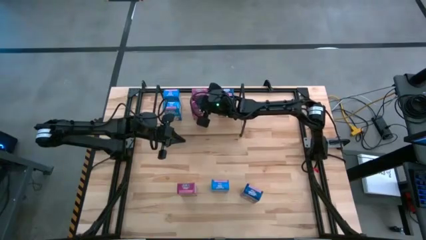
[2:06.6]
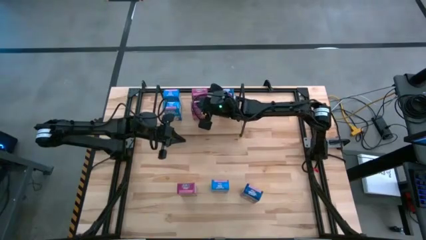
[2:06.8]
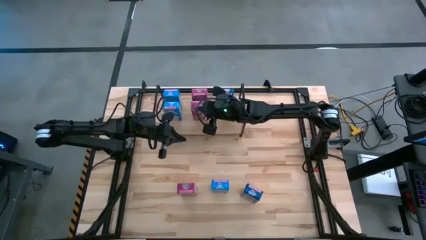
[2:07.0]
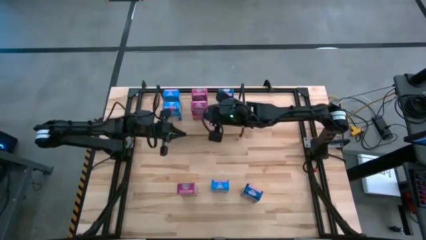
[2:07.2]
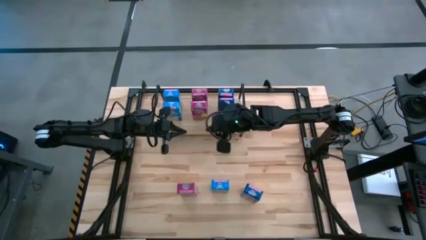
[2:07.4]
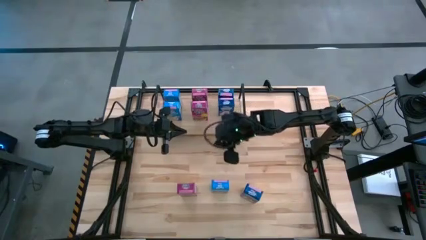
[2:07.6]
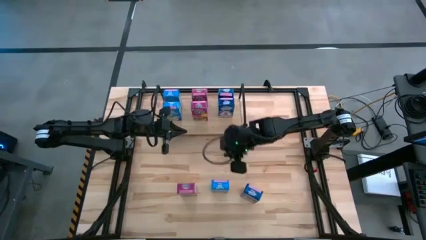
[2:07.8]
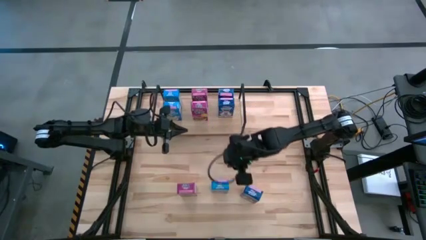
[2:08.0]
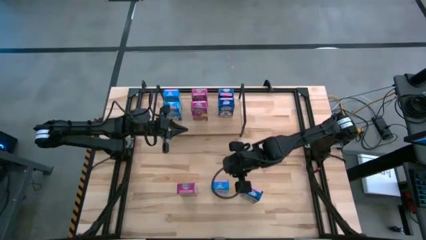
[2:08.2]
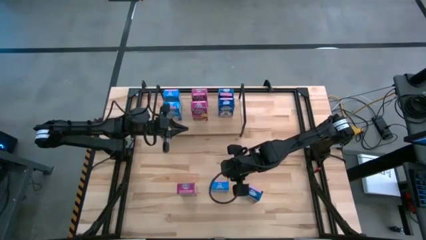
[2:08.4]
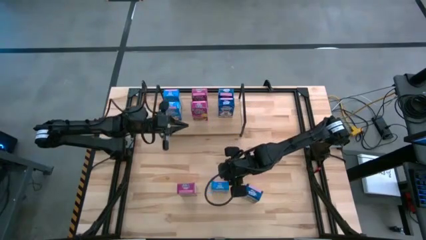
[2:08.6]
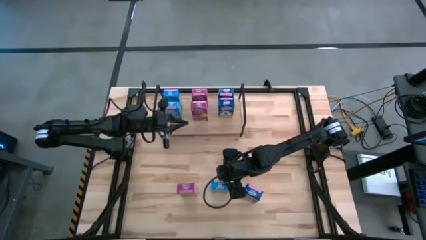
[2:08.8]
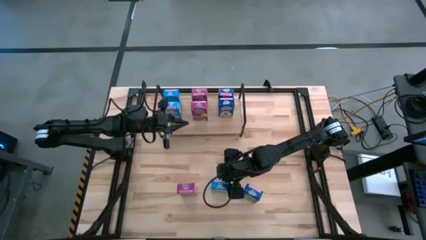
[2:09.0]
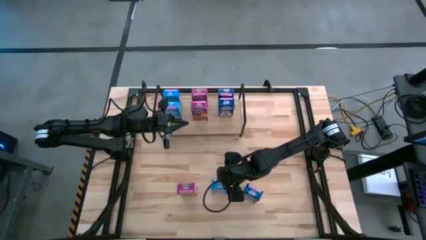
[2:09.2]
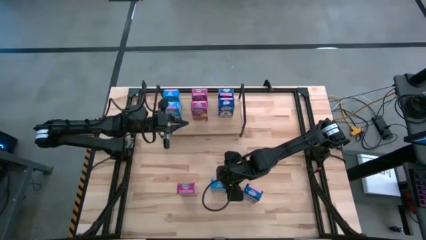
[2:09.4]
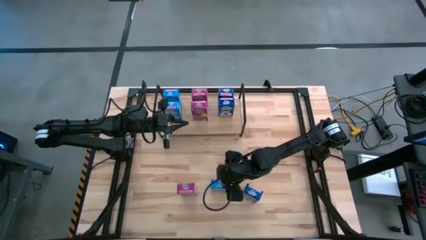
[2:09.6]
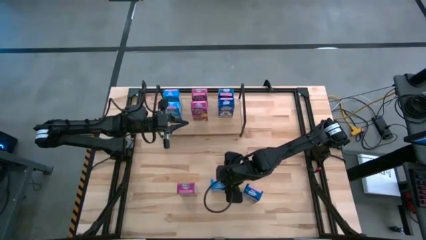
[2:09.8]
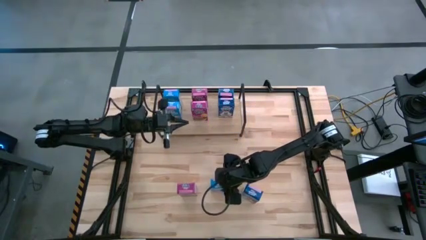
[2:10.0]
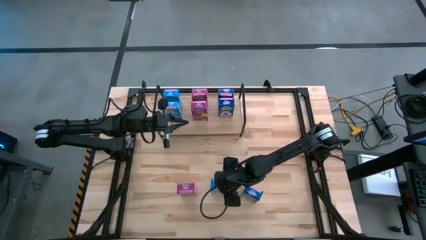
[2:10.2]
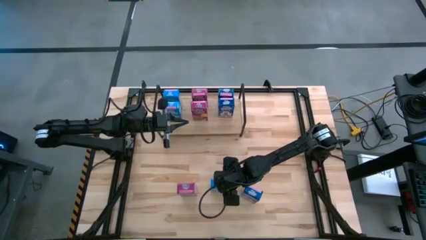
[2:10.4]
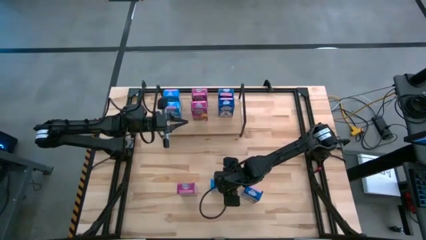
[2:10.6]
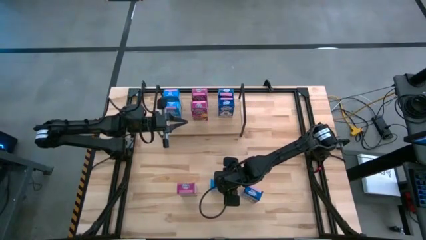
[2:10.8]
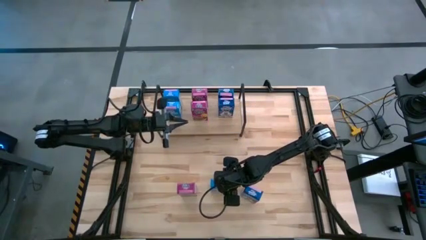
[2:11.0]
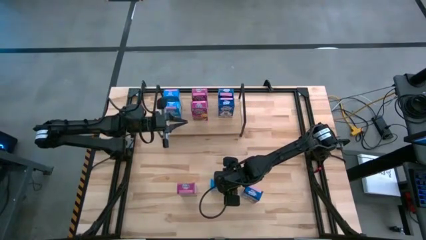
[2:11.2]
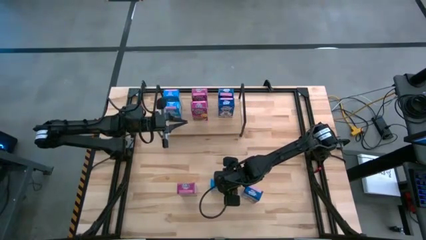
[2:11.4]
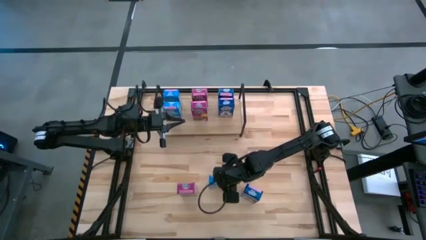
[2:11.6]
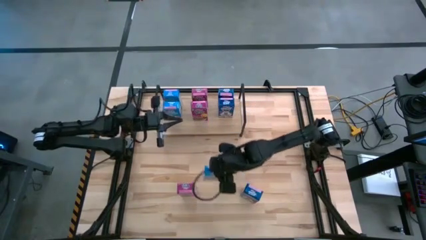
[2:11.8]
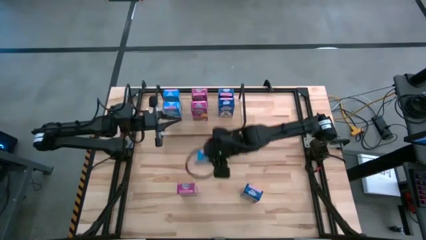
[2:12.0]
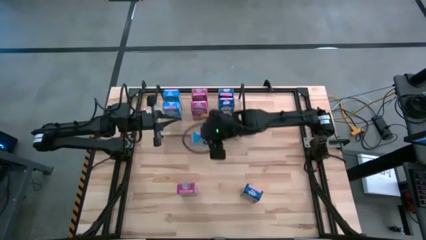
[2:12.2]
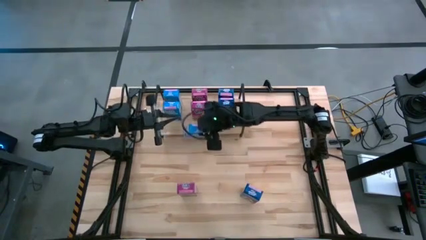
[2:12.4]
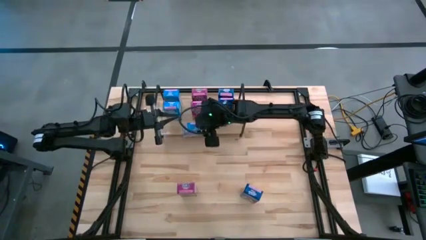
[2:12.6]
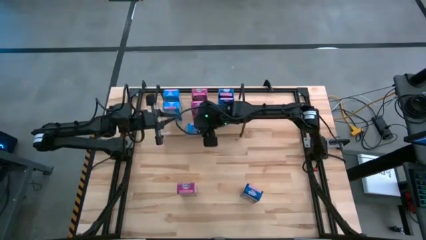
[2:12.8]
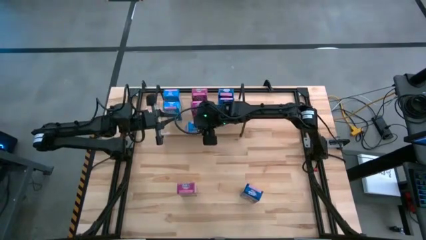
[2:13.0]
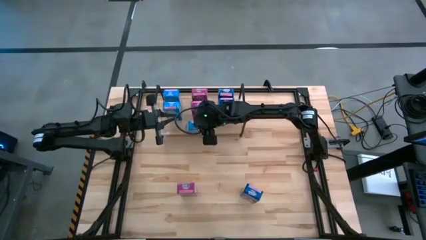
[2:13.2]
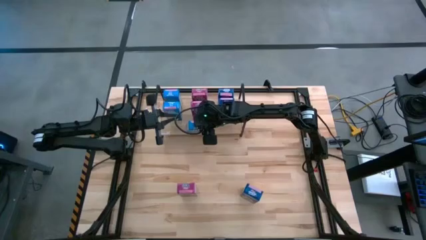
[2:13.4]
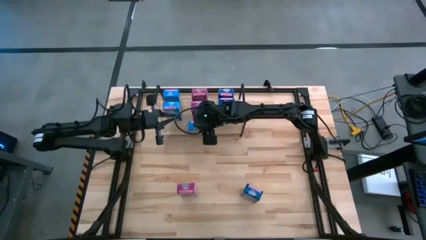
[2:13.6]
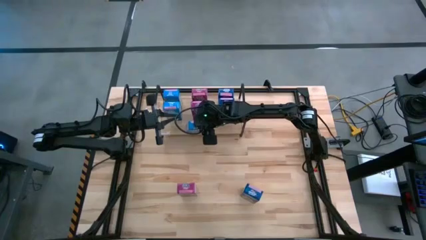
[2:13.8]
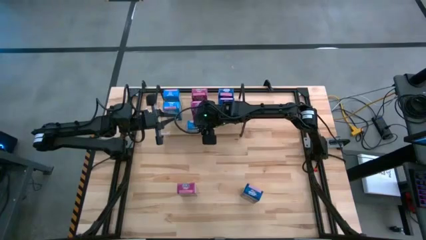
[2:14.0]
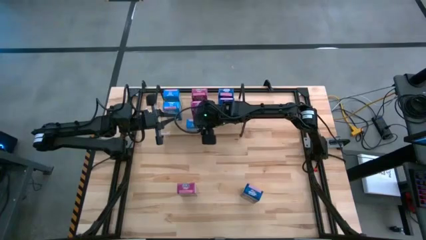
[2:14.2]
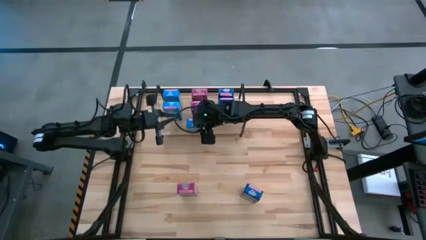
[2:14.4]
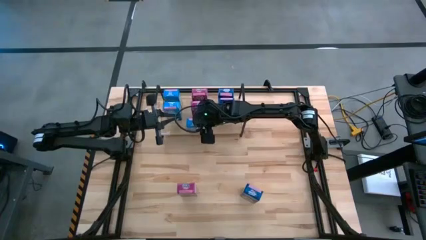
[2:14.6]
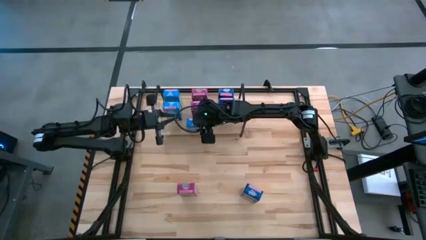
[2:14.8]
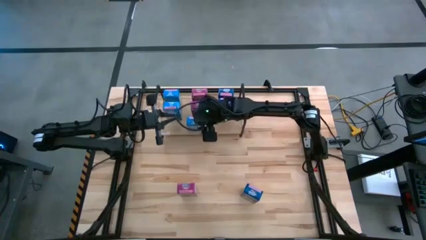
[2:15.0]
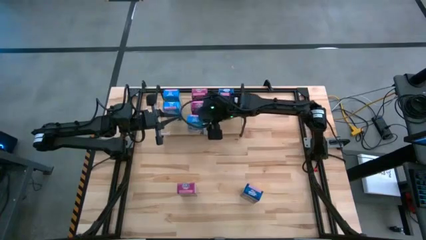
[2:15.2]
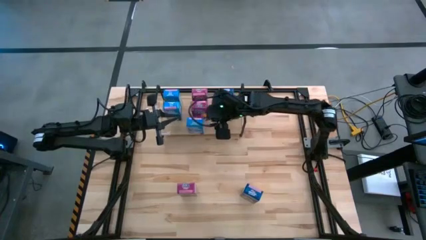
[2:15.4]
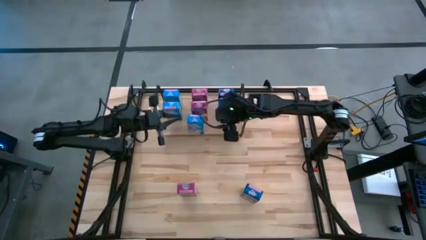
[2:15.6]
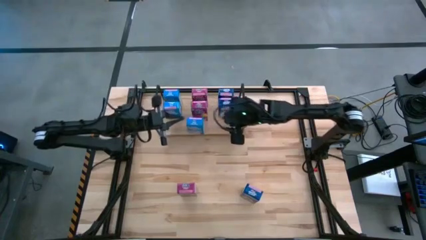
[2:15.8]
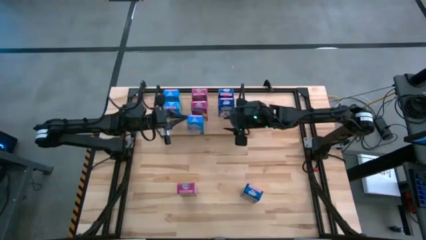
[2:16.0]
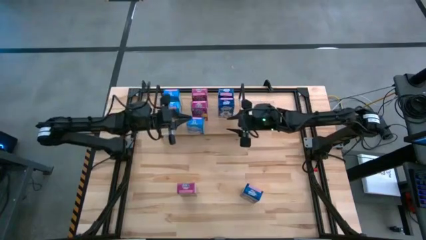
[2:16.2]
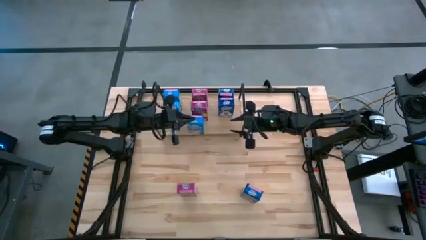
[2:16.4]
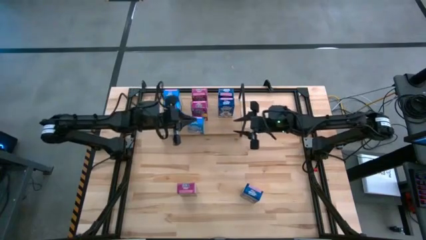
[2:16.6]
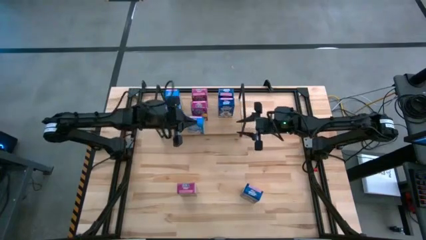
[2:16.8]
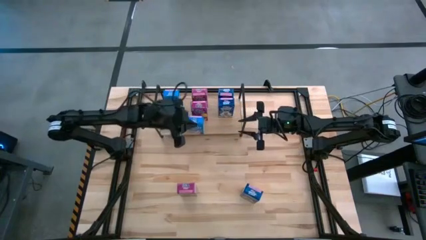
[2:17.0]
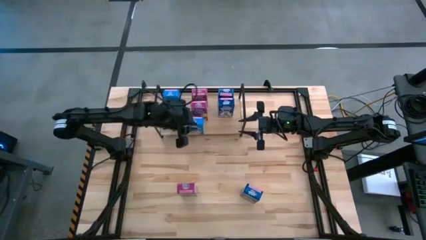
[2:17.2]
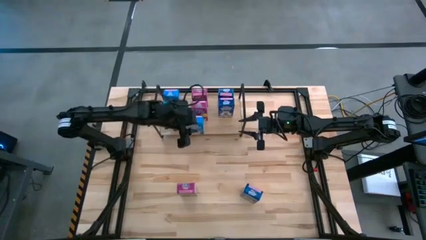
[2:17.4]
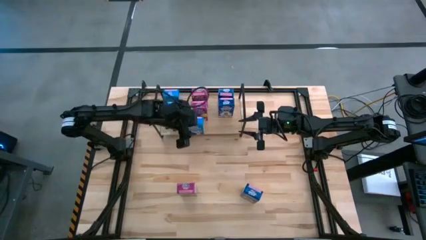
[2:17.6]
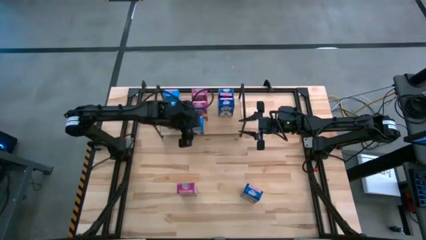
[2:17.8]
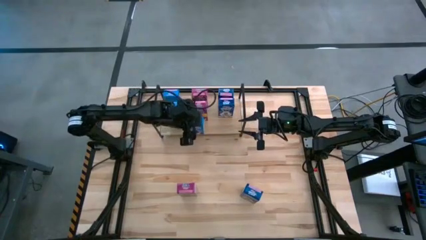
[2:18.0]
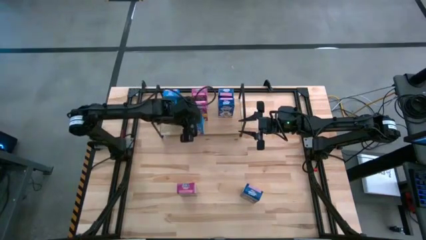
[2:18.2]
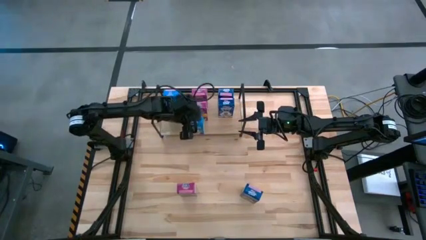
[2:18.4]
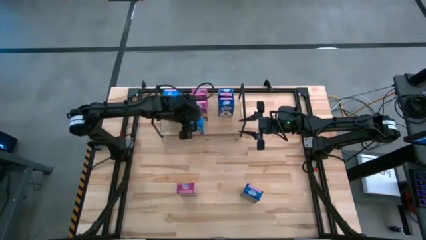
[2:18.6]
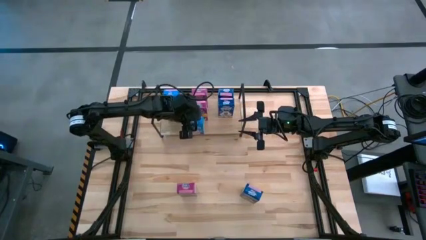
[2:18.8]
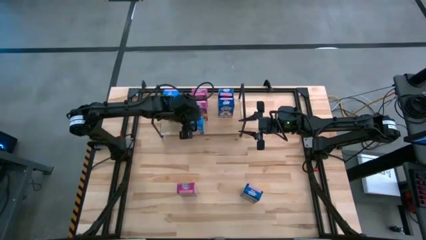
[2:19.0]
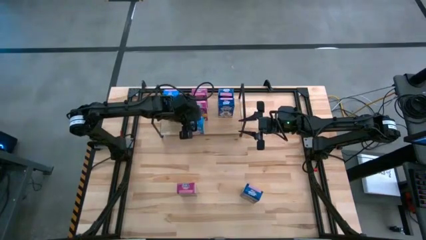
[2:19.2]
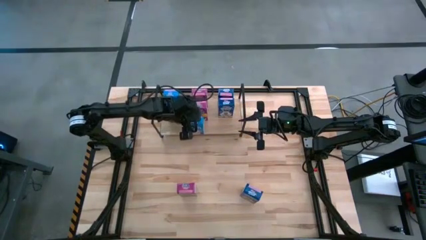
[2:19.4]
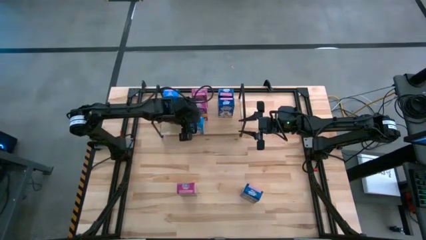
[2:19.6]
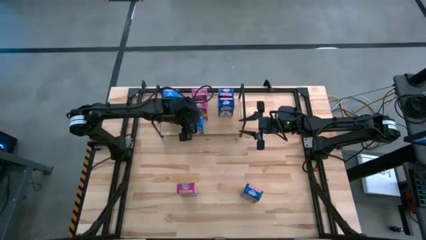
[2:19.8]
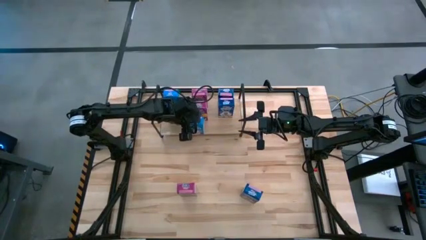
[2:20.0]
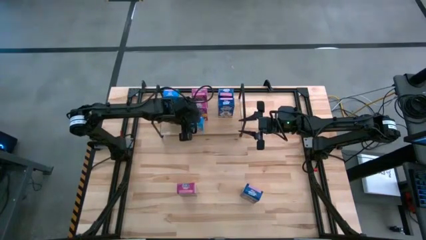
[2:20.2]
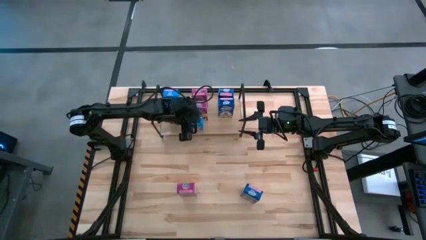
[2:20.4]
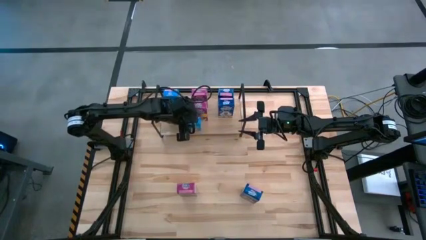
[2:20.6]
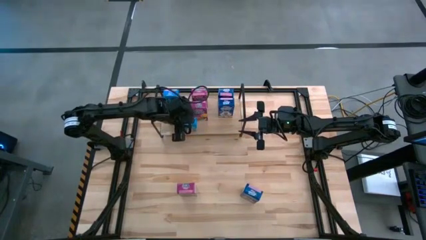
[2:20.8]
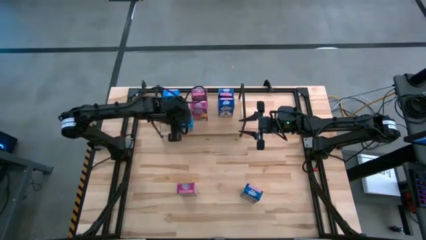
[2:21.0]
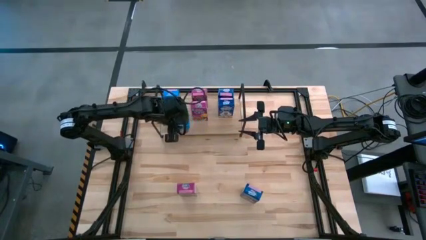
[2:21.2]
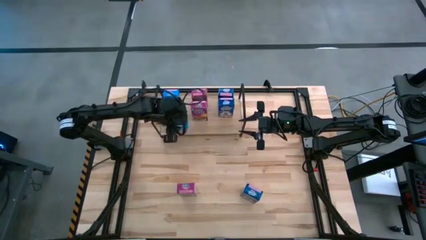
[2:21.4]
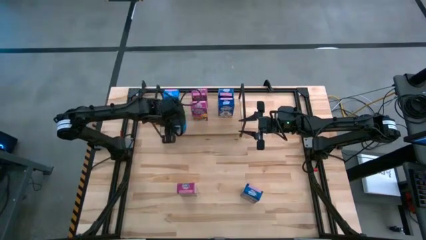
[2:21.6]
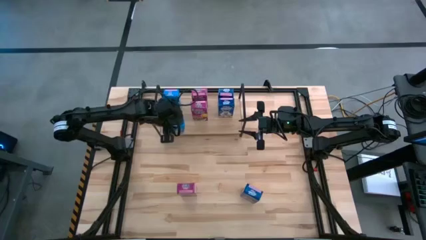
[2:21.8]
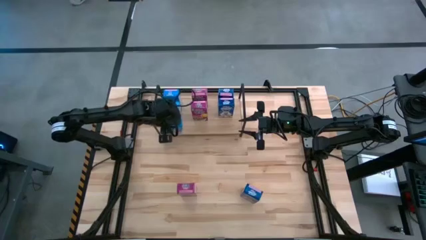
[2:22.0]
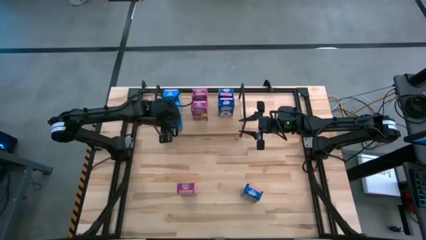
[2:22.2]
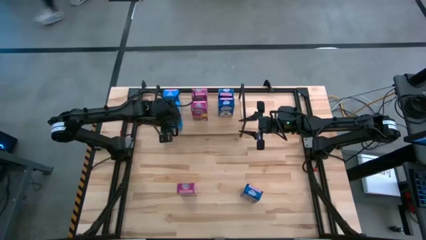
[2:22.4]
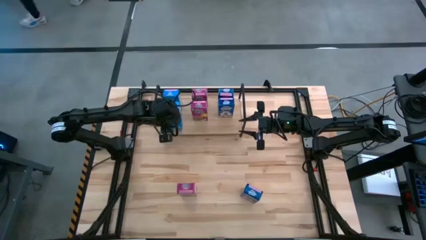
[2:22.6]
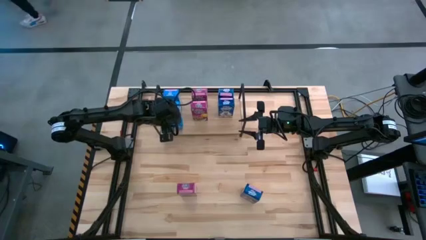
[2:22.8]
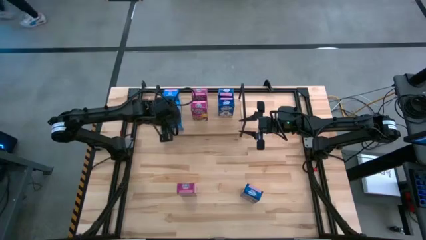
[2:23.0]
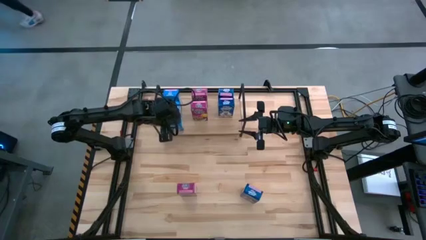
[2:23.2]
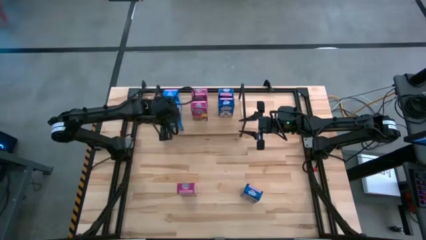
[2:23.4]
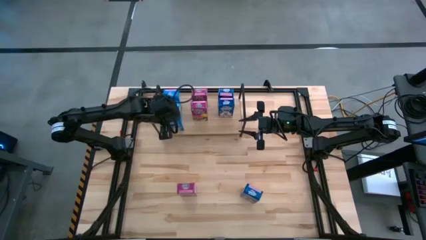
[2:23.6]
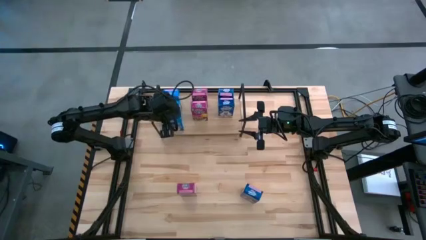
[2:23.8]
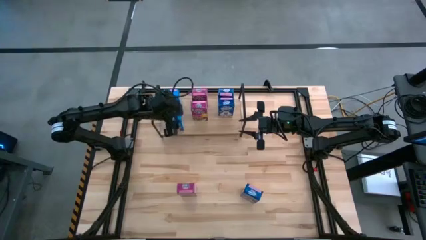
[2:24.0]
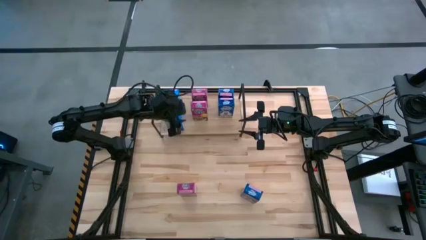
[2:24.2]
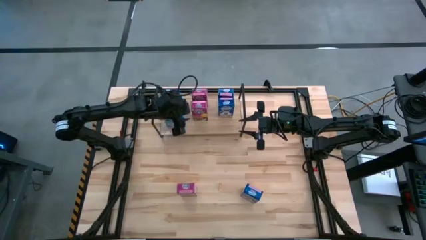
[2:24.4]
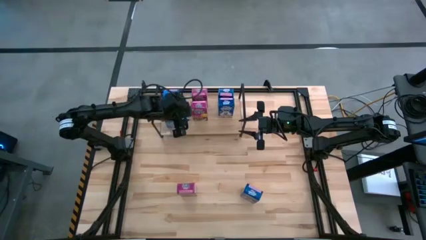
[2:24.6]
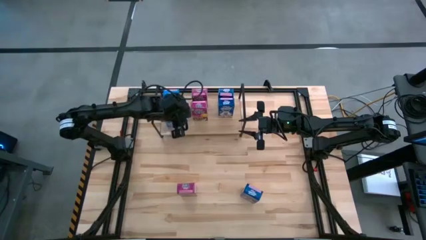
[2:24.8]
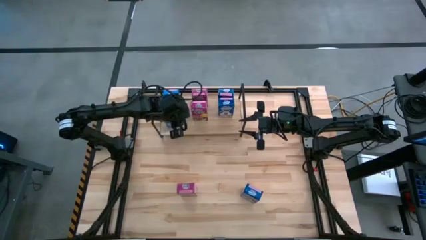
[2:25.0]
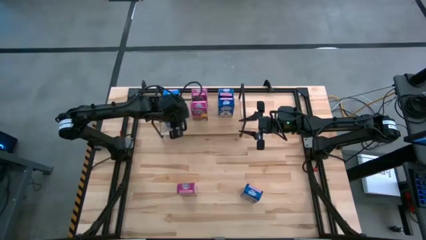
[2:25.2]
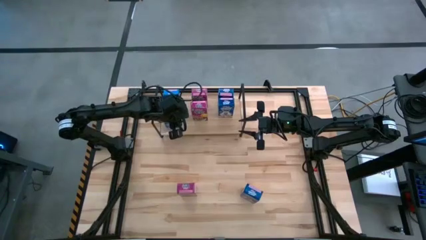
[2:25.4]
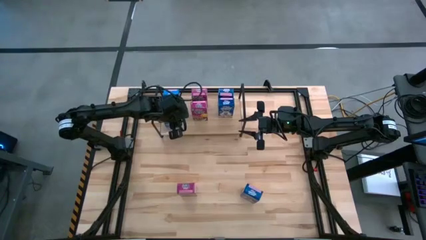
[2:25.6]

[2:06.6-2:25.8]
Task: Stack cereal on shelf
Put the light blue cereal box on the shelf aligned with the light blue cereal box
